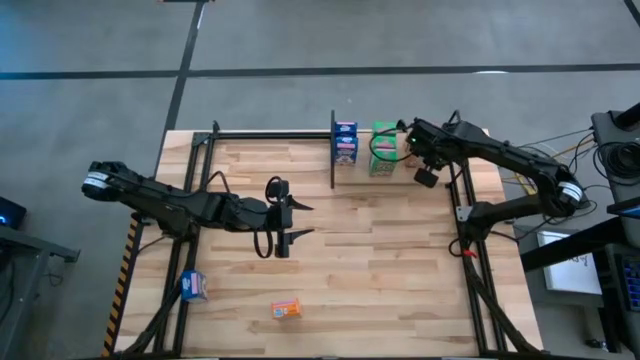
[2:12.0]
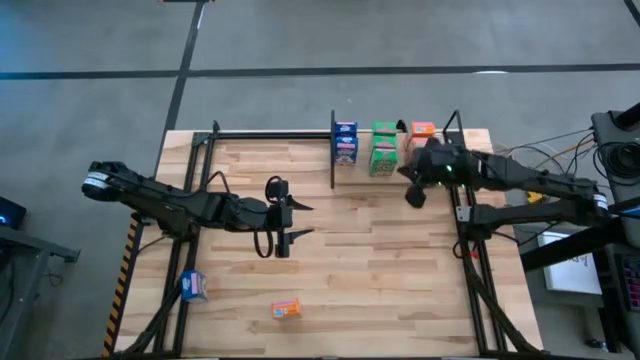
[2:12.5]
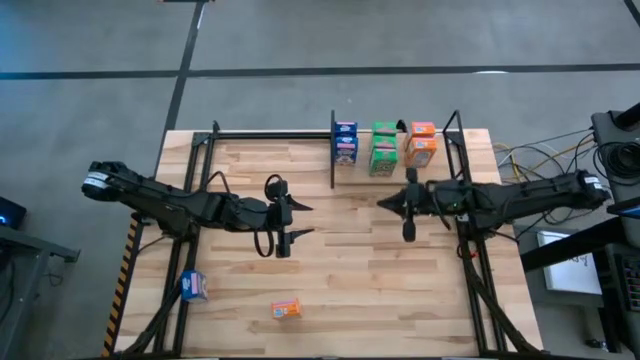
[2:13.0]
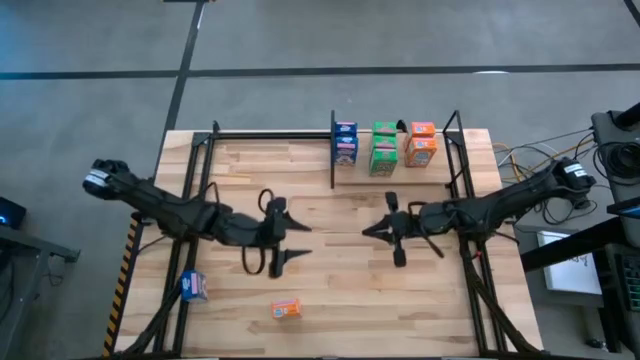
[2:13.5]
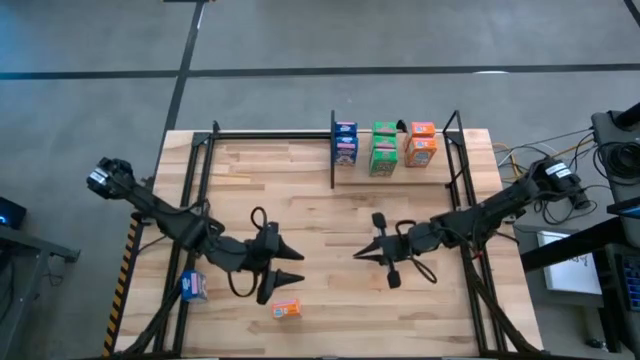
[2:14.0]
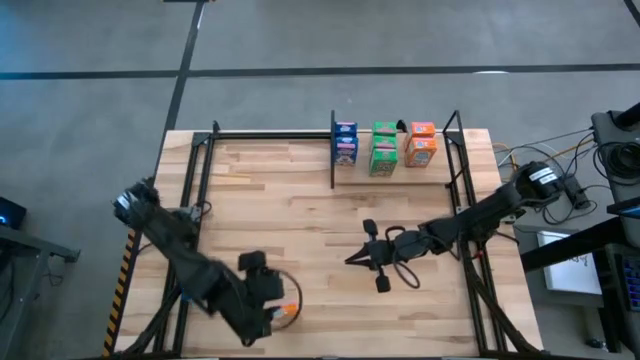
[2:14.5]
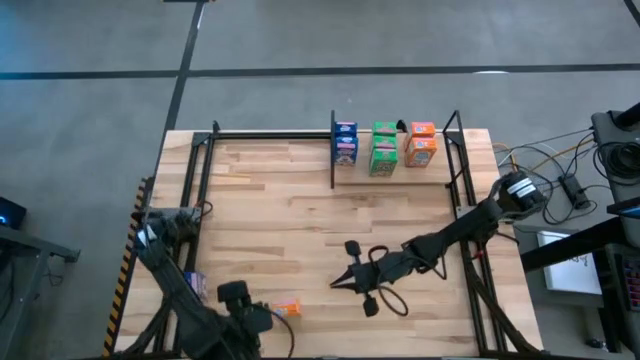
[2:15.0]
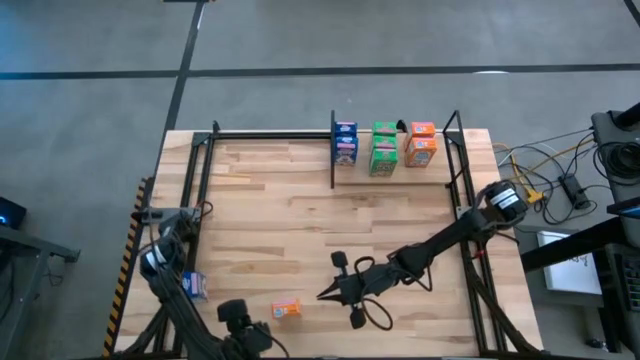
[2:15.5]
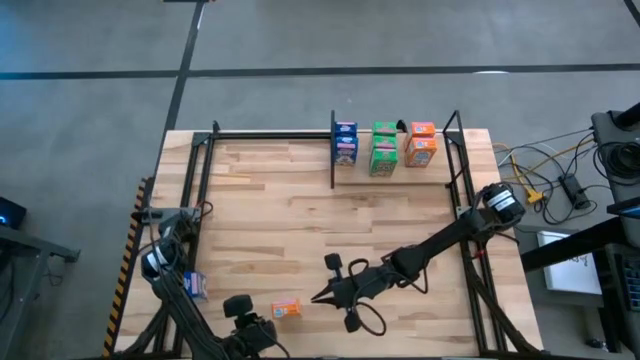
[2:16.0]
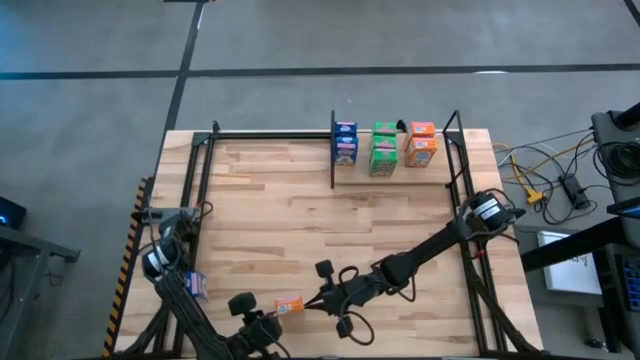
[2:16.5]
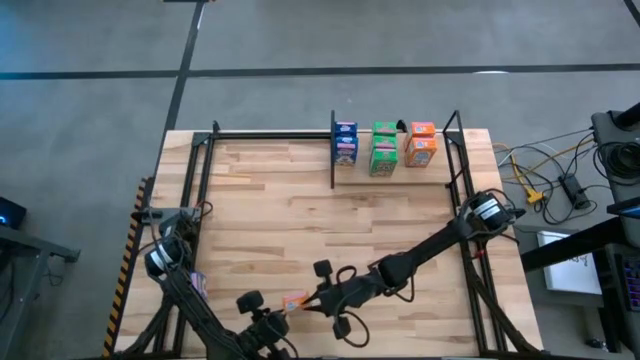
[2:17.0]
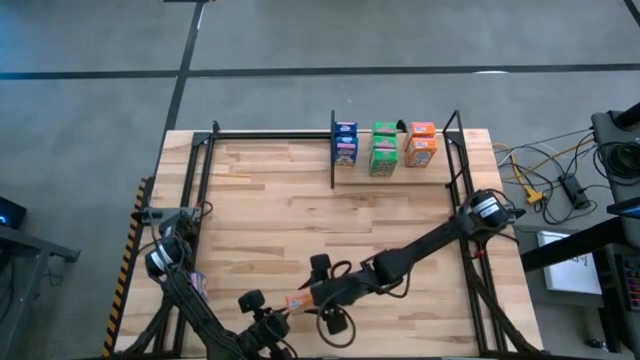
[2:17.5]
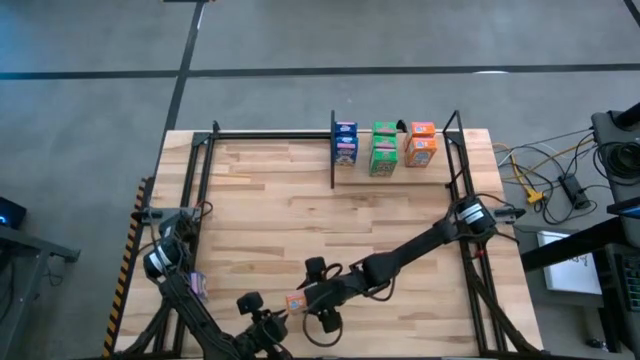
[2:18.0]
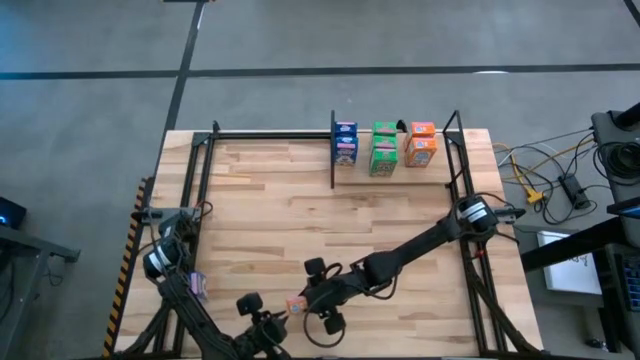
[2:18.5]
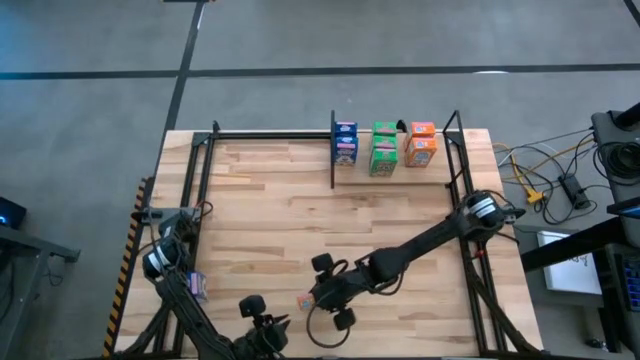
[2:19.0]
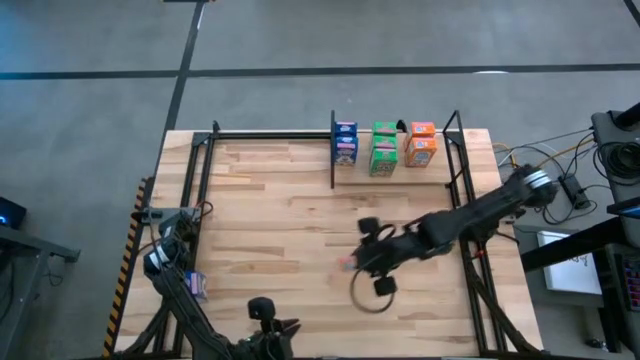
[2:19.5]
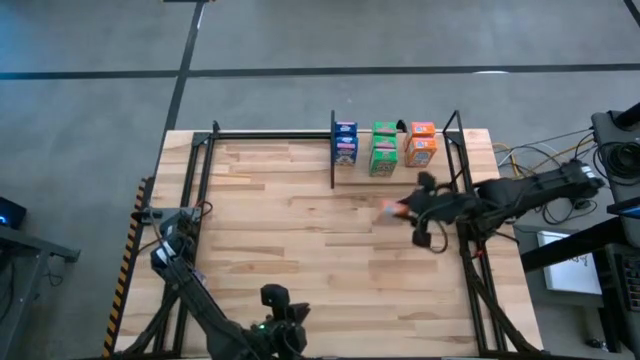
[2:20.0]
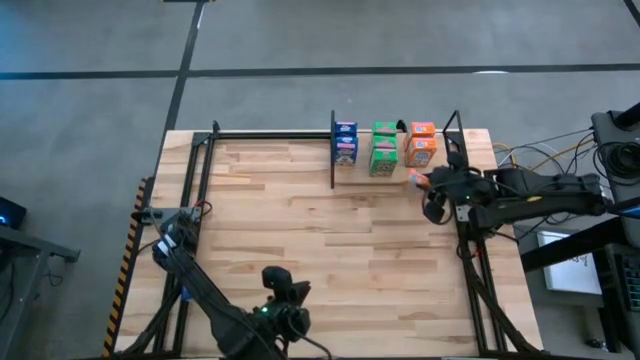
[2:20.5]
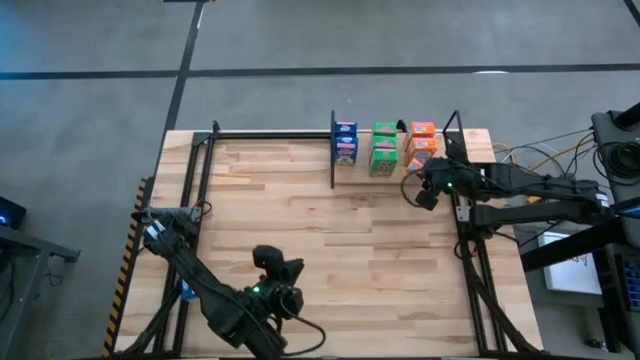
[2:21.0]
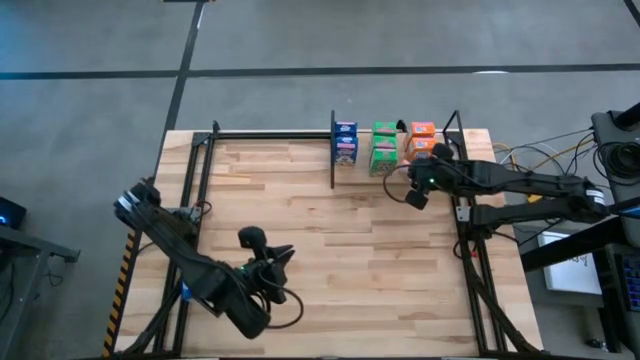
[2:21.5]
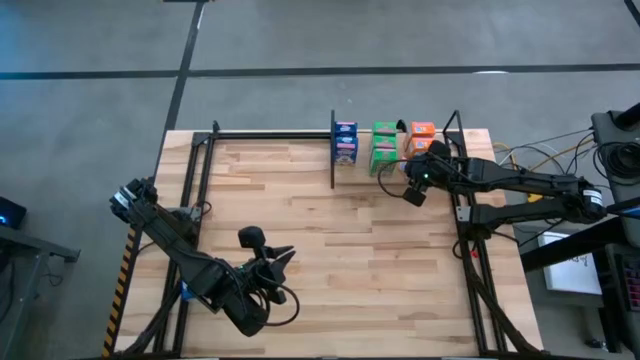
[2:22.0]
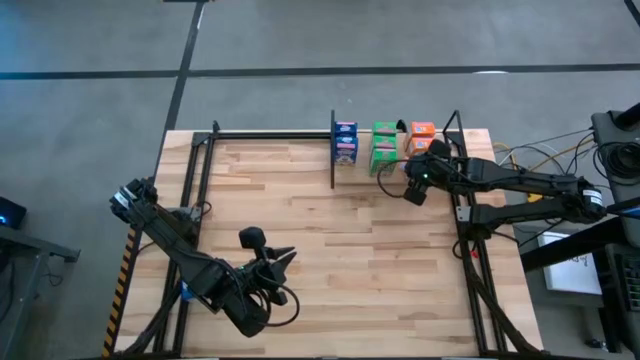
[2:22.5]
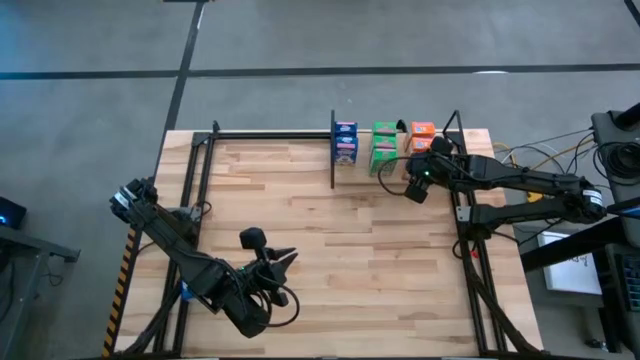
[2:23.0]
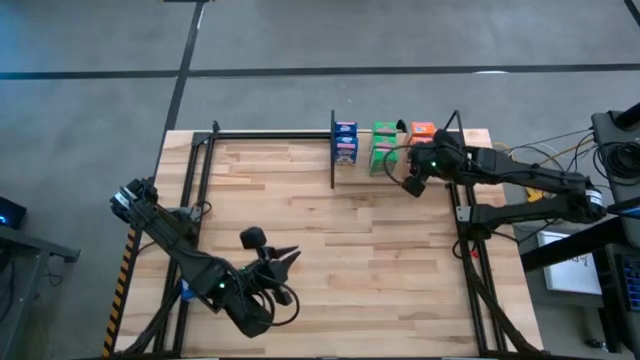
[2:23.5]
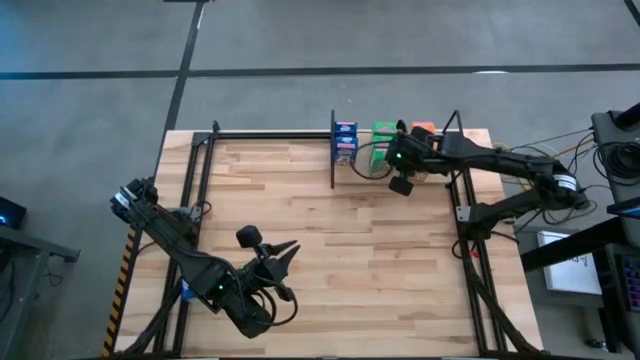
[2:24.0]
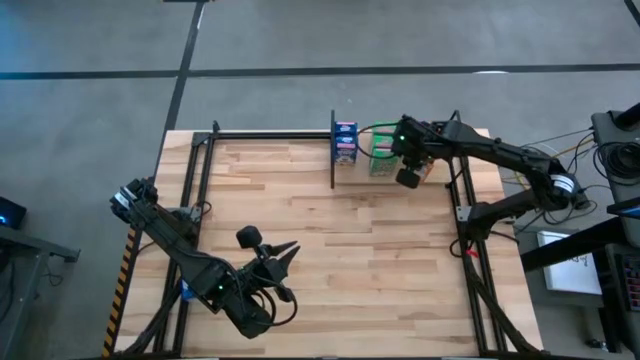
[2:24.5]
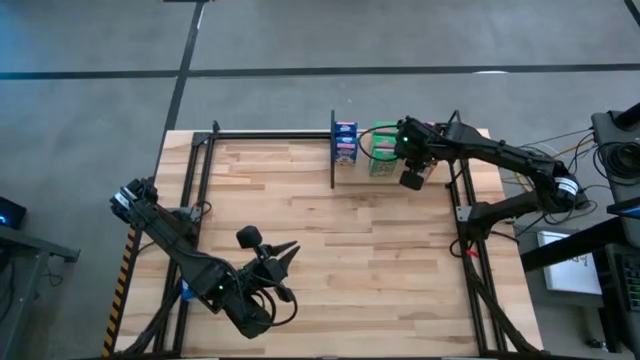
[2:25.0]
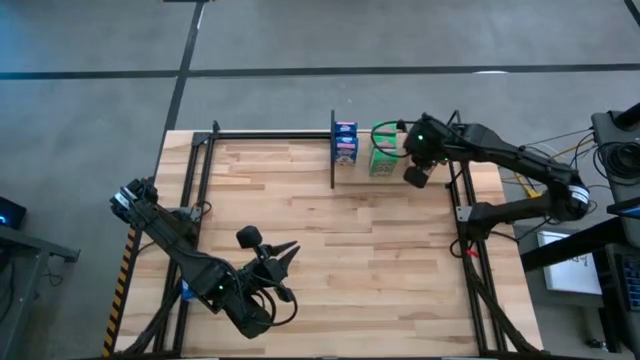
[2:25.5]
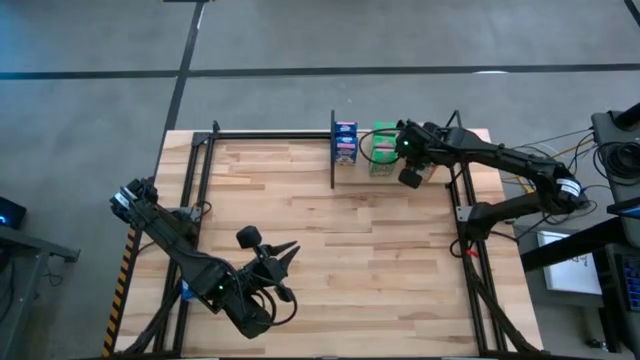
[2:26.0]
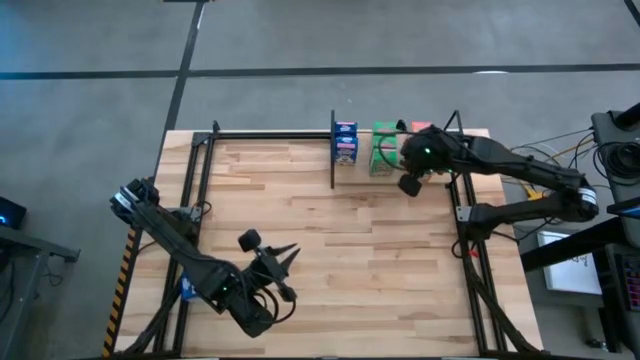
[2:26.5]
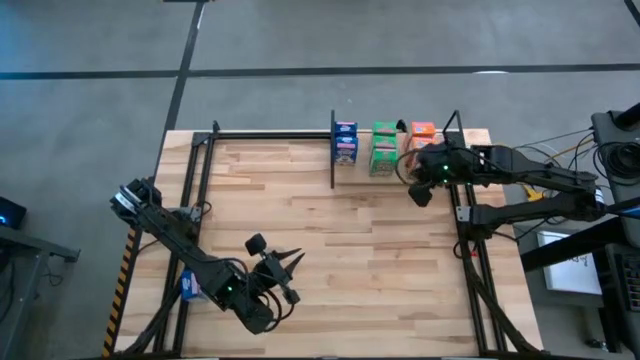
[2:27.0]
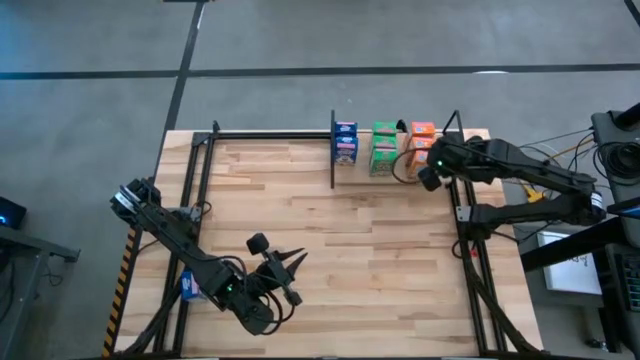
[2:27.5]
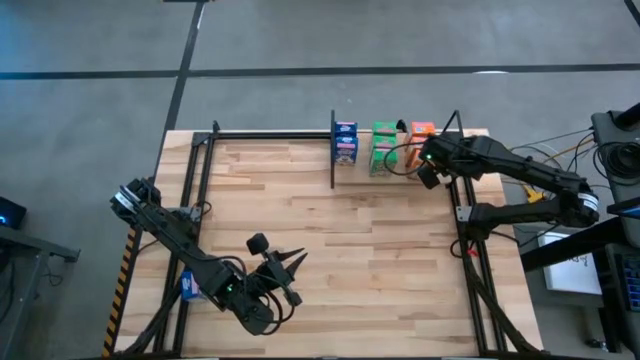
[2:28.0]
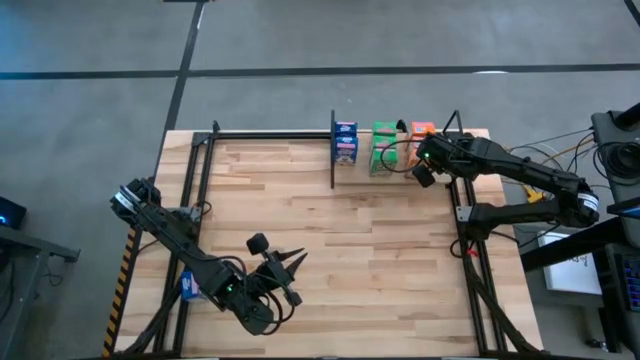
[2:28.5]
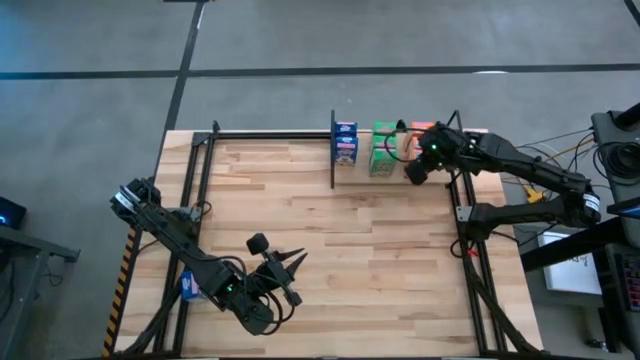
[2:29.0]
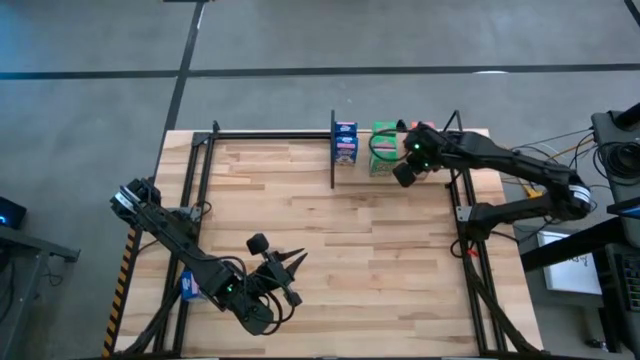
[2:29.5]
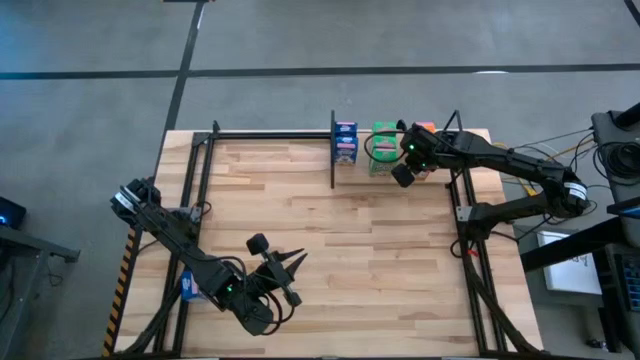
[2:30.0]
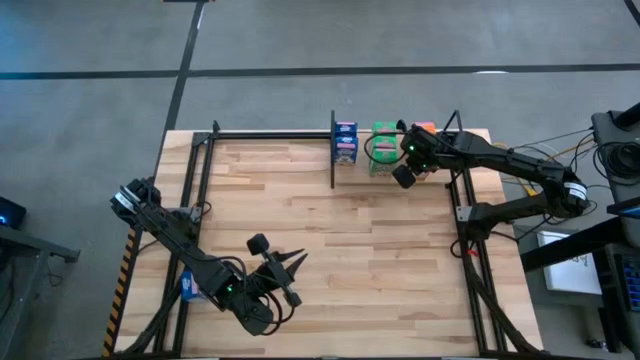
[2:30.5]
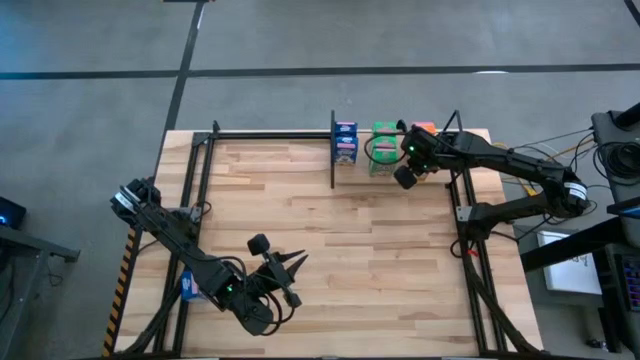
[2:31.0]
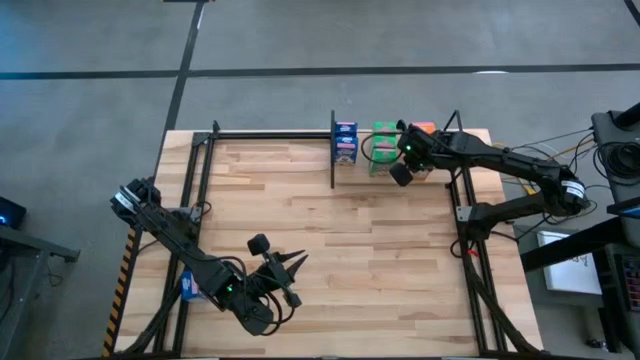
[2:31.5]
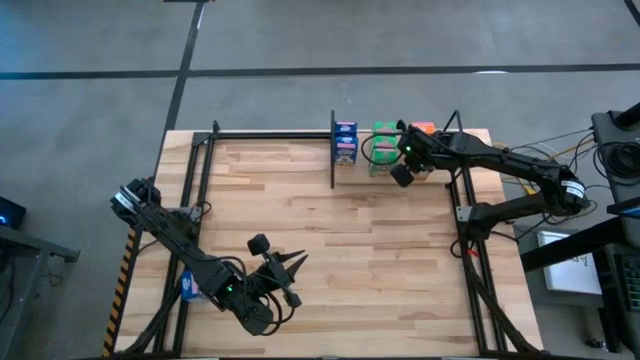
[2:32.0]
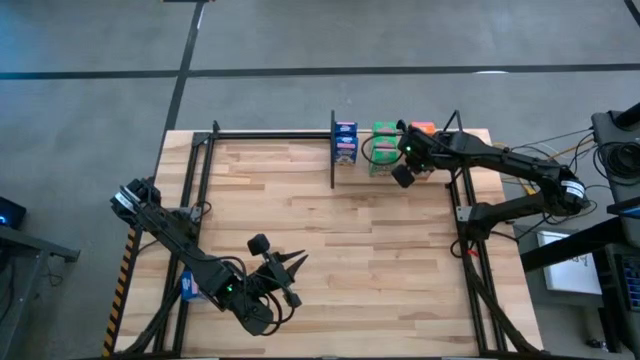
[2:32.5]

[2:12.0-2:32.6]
Task: Stack cereal on shelf
Put the orange cereal box on the shelf aligned with the other orange cereal box on the shelf
